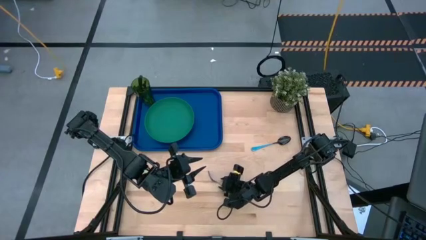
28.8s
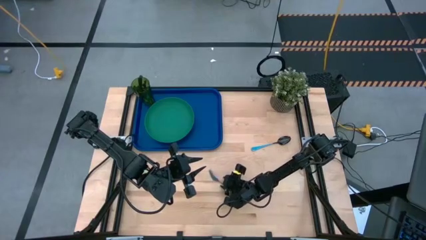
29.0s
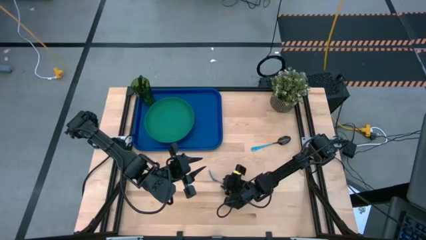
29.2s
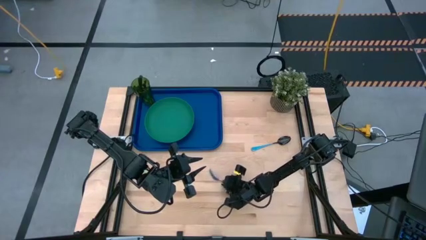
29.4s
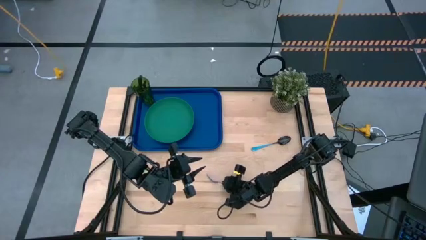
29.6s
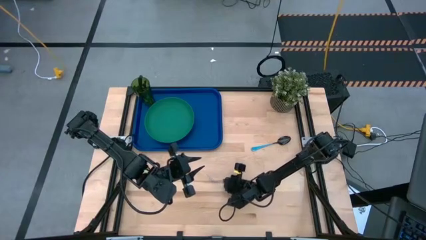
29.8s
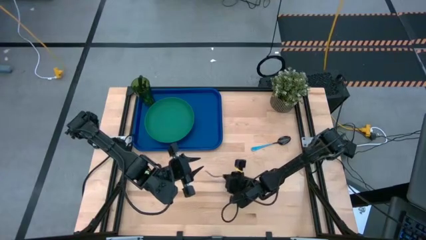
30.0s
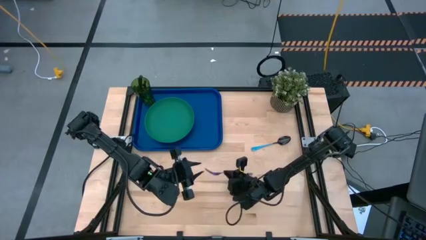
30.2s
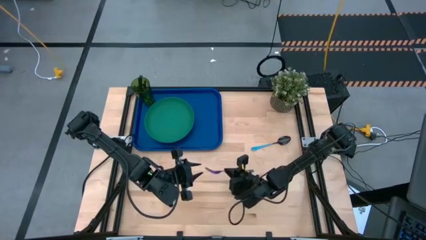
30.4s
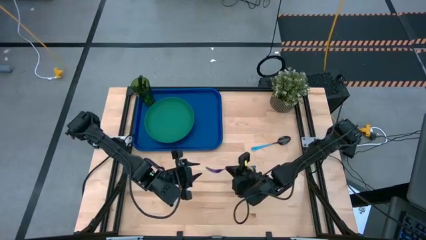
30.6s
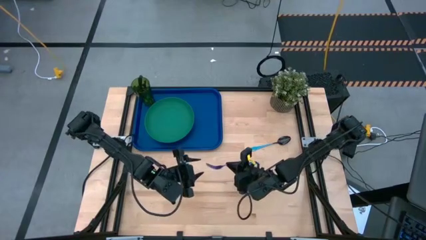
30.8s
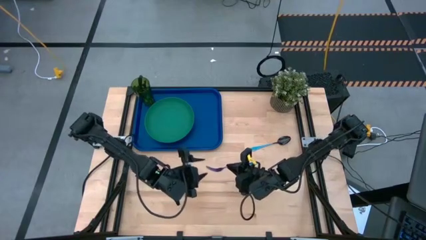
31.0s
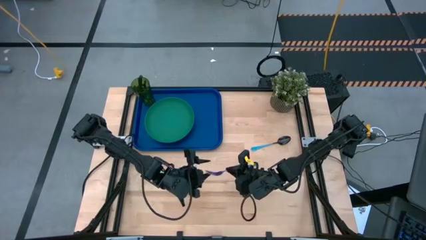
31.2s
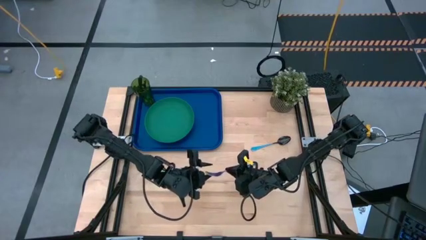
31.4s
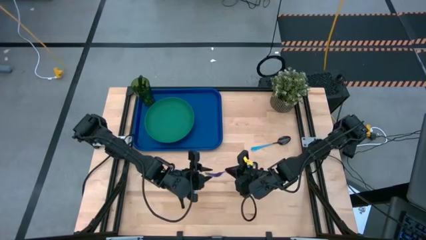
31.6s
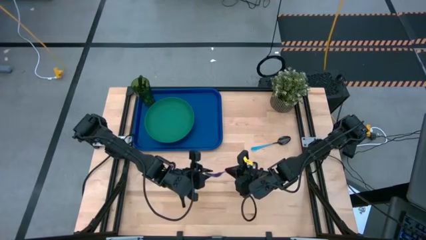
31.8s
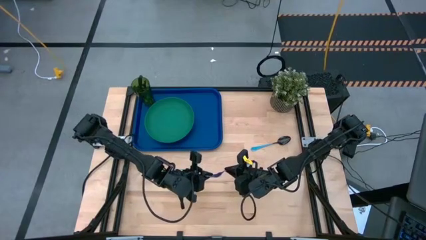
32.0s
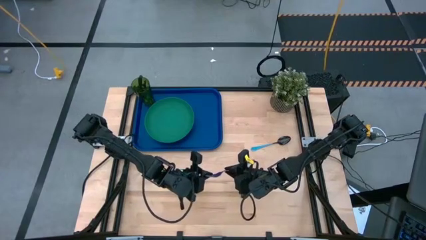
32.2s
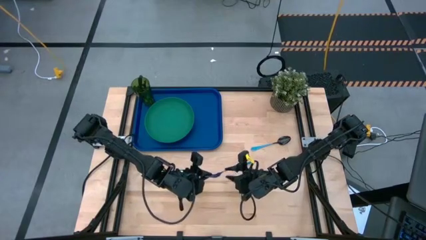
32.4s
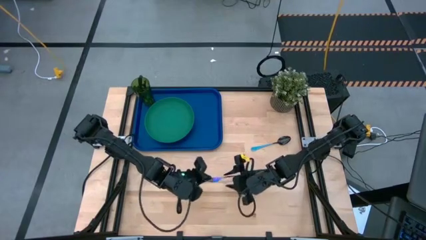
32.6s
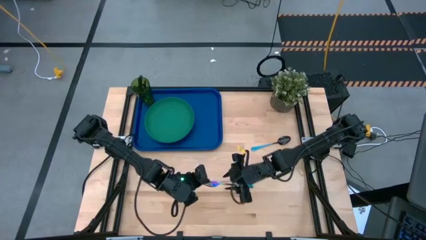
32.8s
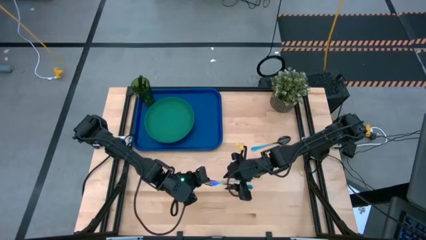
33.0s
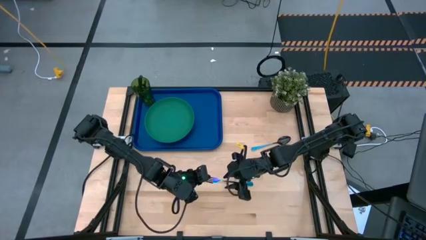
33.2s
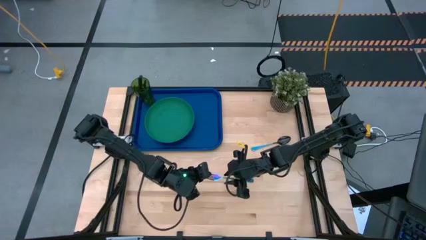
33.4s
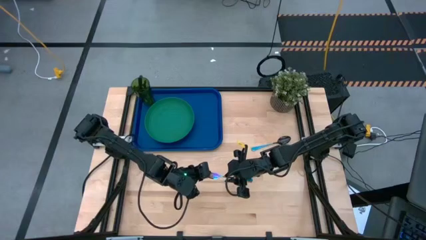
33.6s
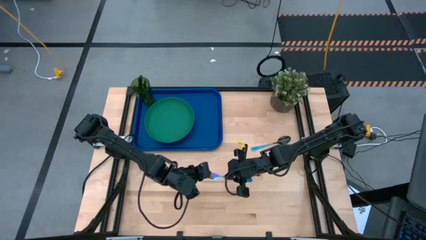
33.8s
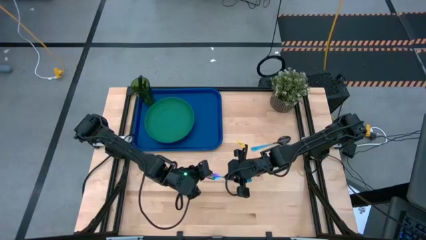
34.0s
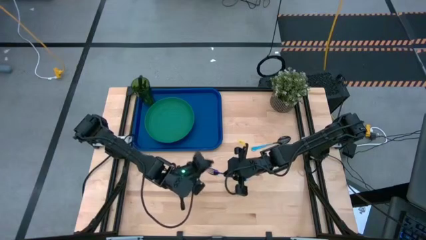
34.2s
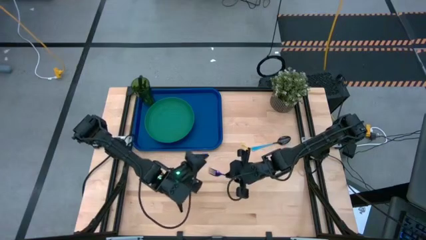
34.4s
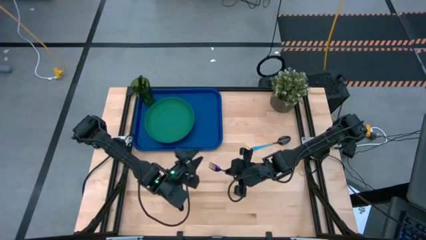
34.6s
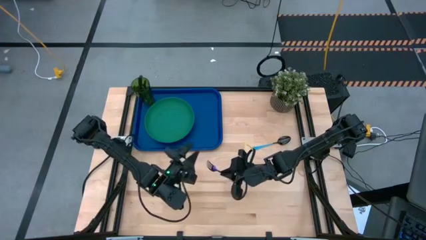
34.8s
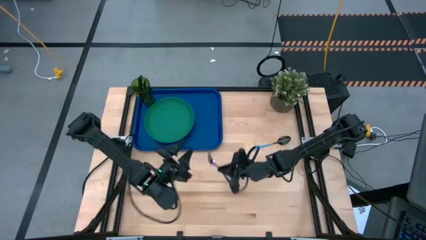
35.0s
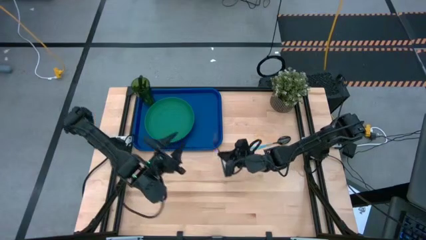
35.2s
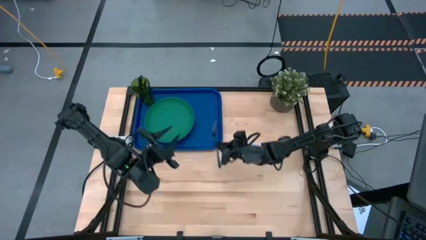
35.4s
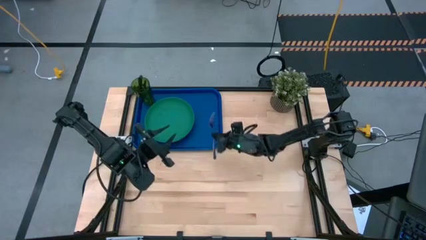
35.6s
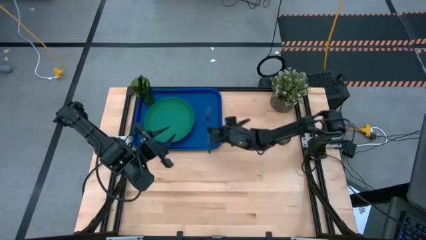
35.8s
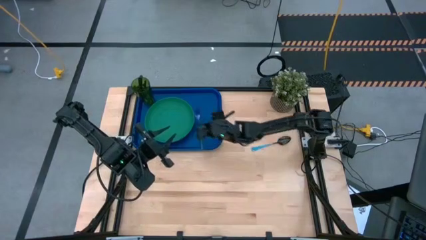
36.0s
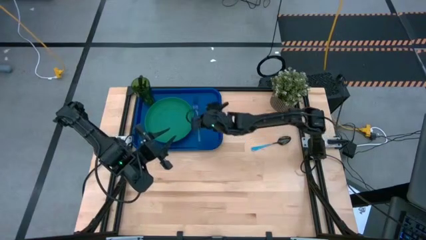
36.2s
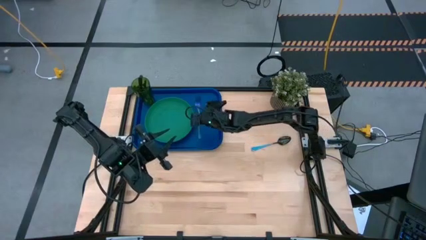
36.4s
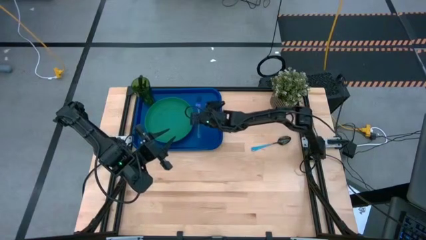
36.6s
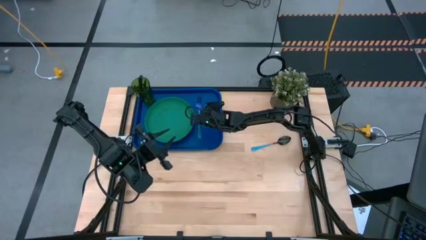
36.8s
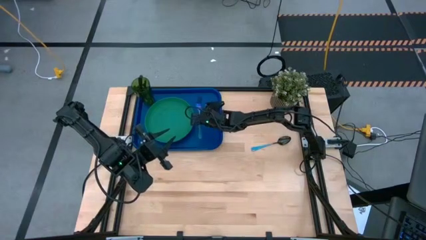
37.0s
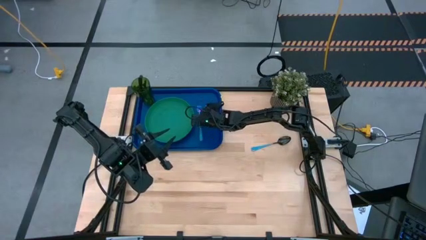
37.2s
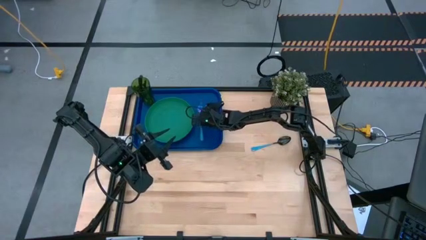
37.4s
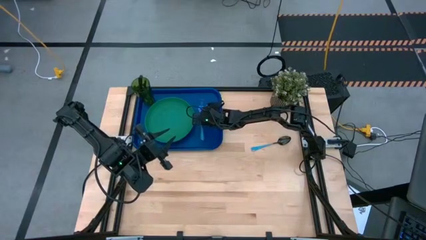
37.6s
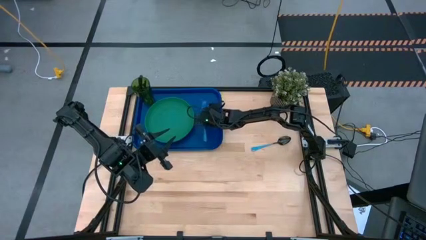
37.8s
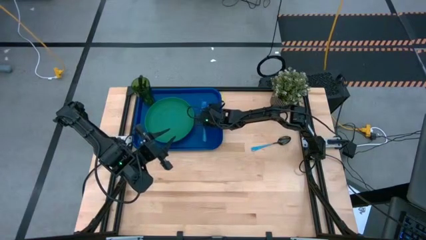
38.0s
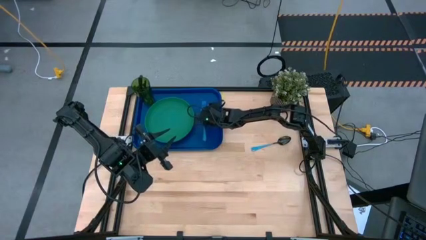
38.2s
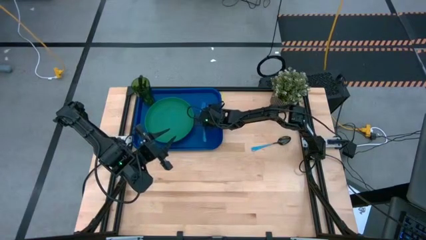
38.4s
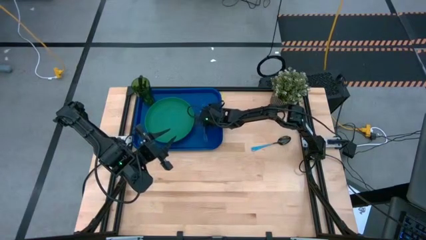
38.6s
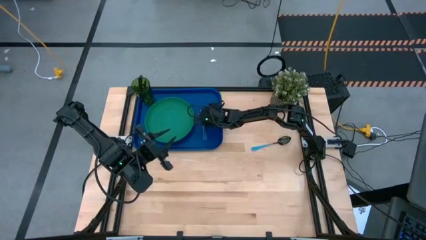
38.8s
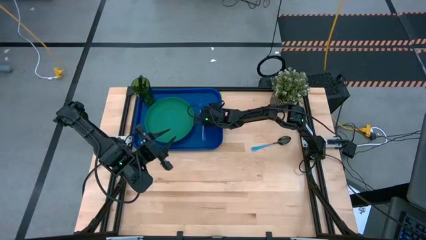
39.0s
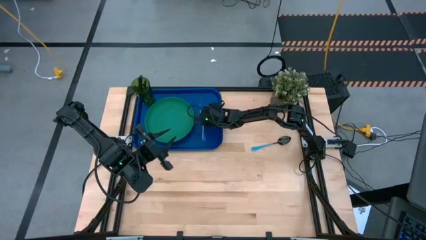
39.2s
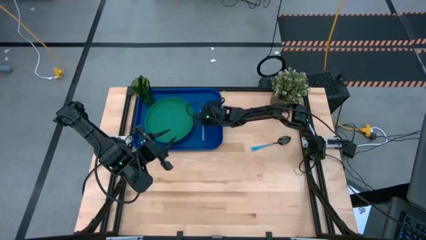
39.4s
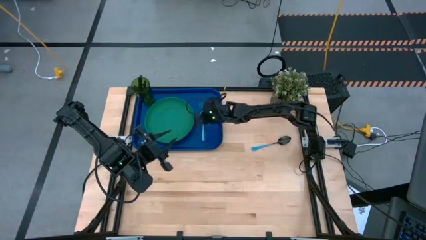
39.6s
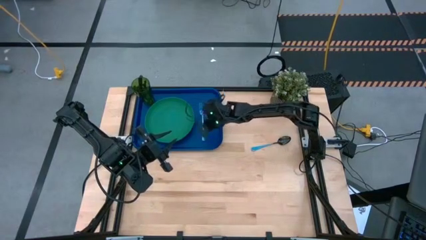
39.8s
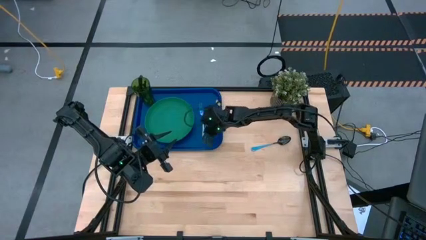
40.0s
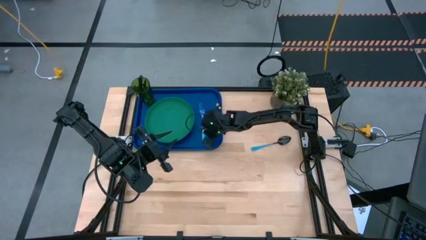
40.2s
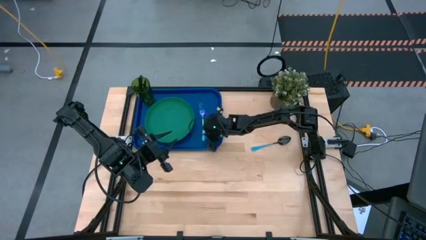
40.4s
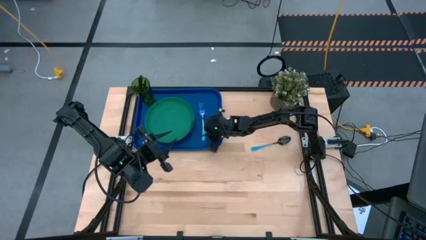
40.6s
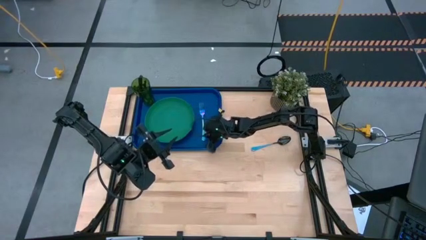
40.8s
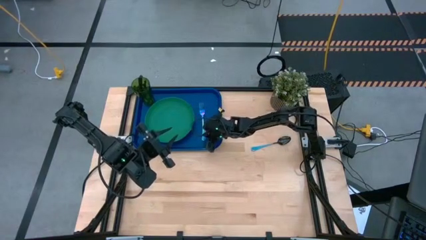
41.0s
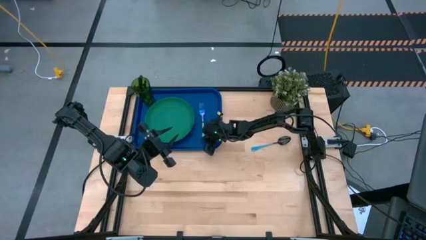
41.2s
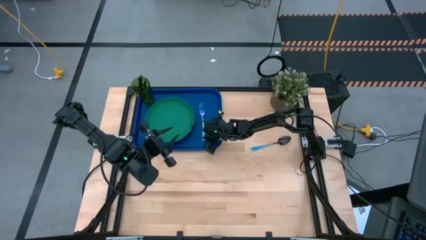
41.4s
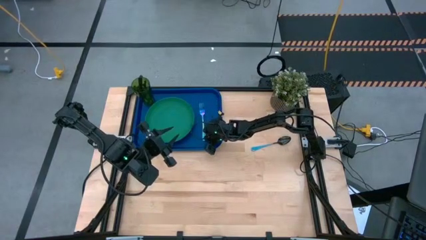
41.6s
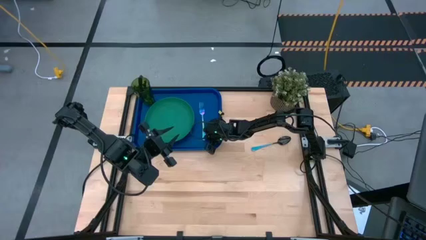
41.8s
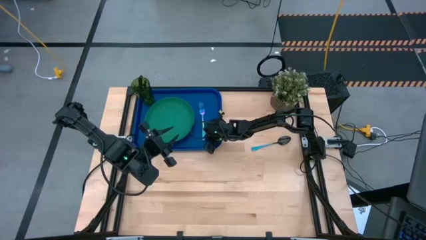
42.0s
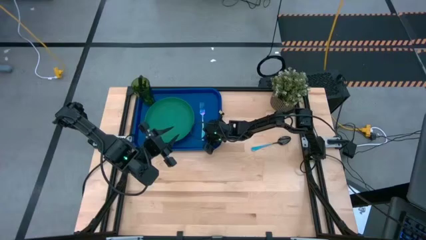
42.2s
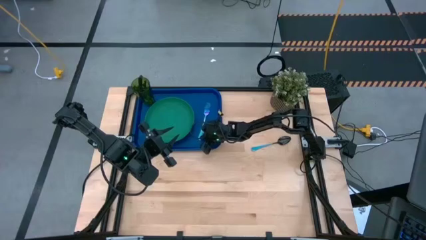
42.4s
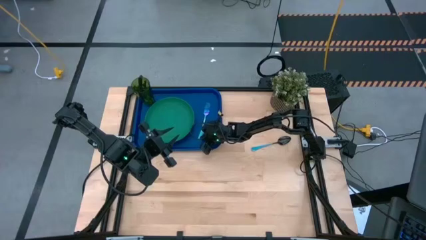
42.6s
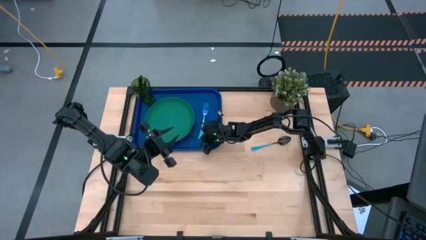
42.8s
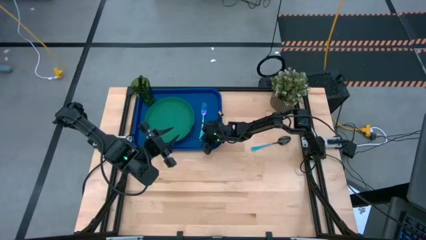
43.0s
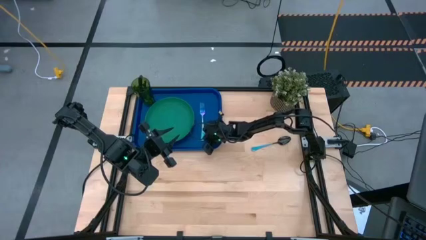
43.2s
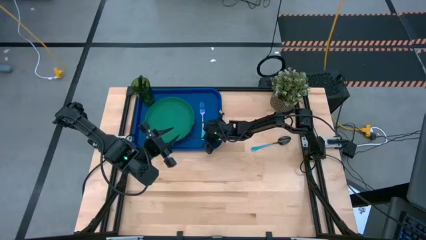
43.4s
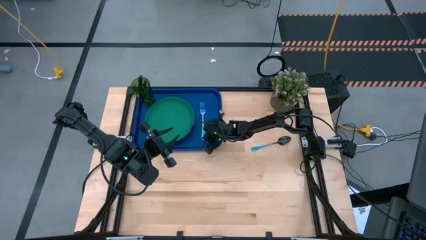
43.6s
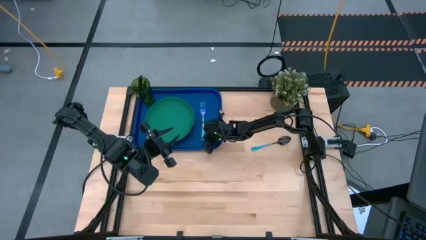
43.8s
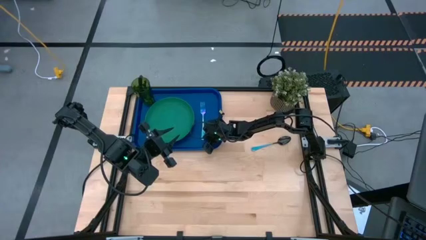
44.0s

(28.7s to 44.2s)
Task: Pick and place plate/cup/fork/spoon on tray
Put the blue fork on the blue serving tray to the right of the green plate
